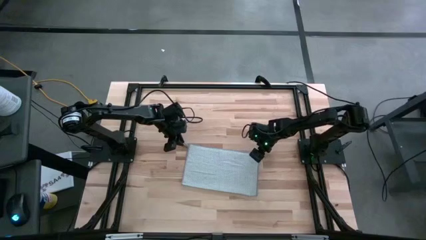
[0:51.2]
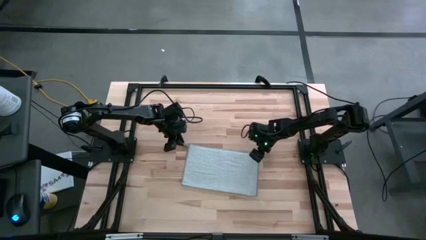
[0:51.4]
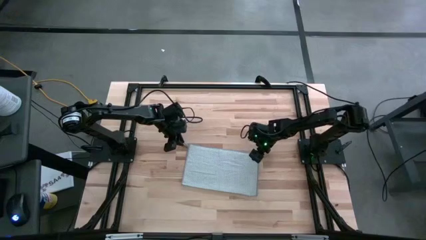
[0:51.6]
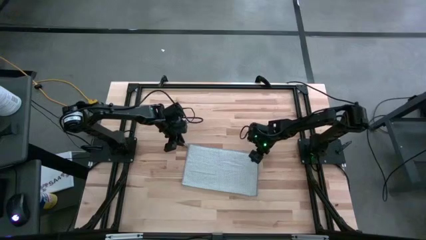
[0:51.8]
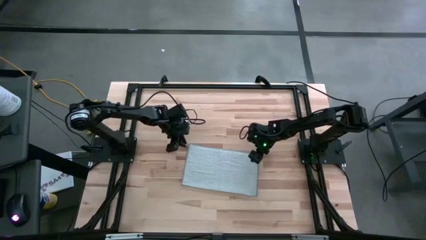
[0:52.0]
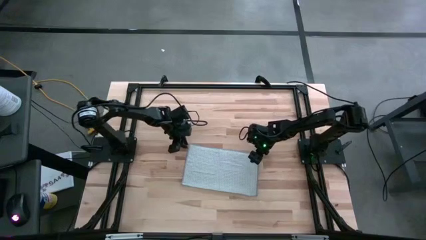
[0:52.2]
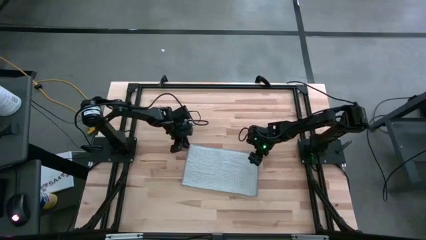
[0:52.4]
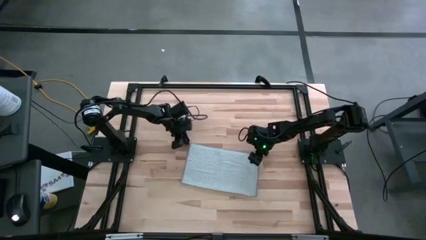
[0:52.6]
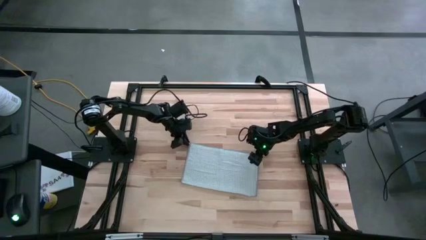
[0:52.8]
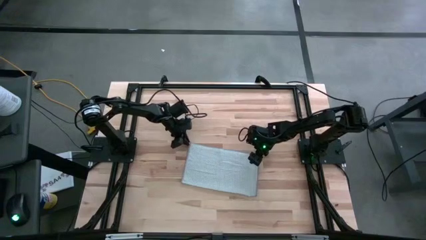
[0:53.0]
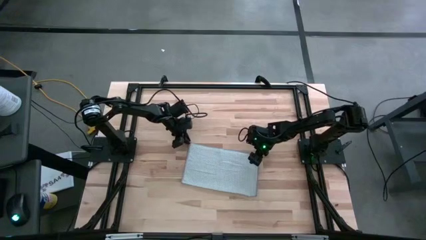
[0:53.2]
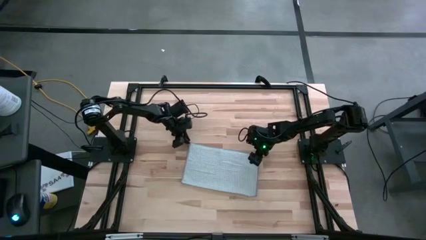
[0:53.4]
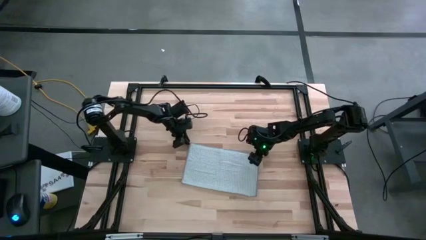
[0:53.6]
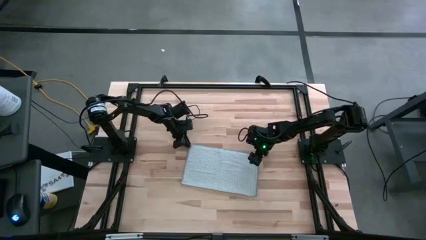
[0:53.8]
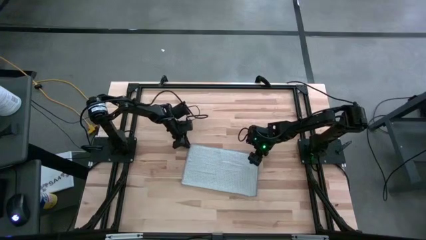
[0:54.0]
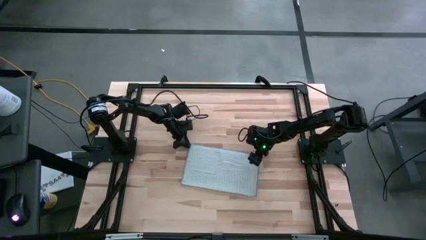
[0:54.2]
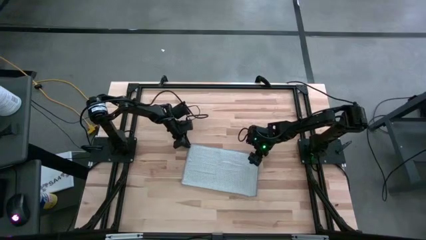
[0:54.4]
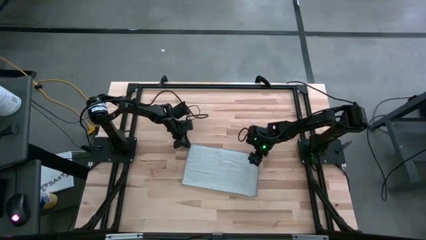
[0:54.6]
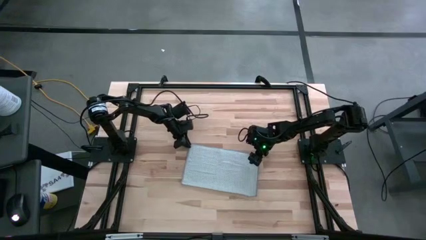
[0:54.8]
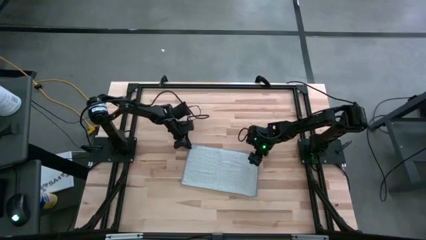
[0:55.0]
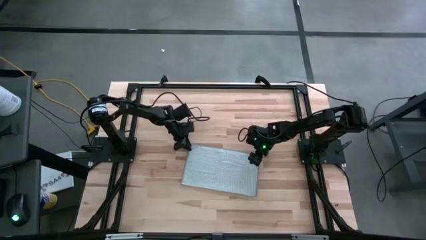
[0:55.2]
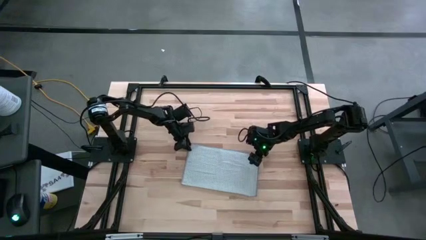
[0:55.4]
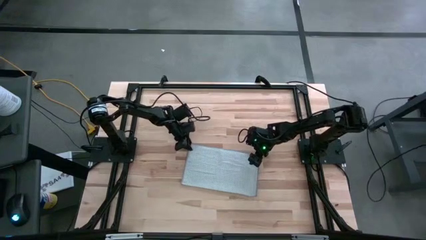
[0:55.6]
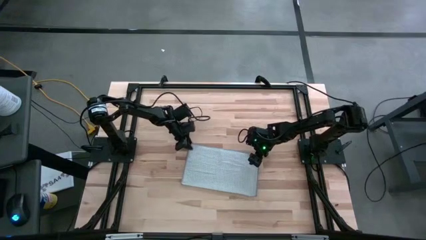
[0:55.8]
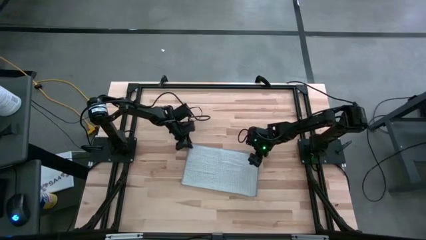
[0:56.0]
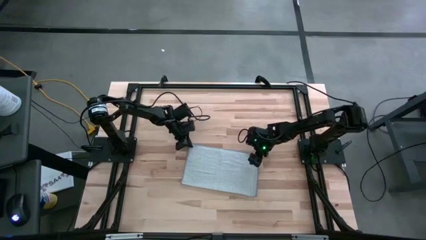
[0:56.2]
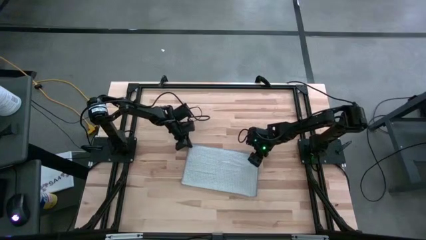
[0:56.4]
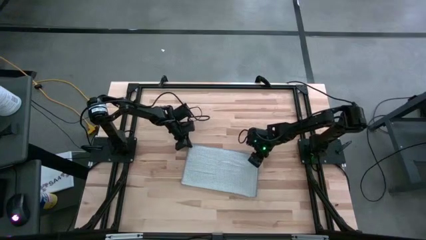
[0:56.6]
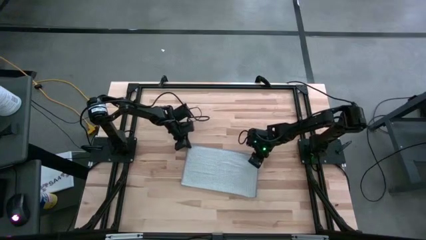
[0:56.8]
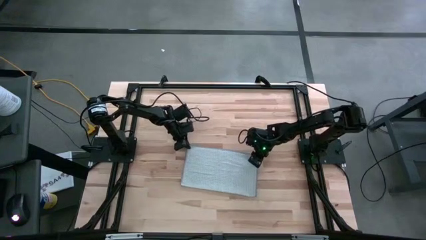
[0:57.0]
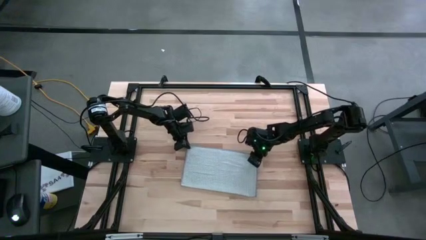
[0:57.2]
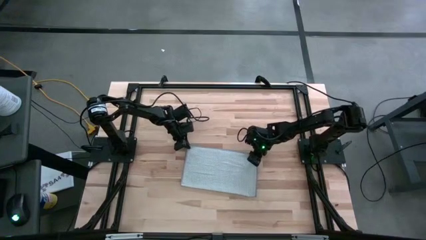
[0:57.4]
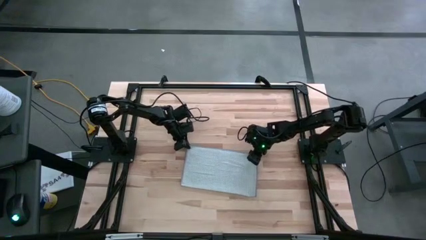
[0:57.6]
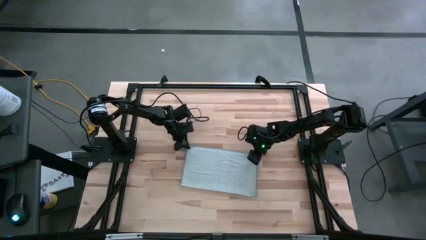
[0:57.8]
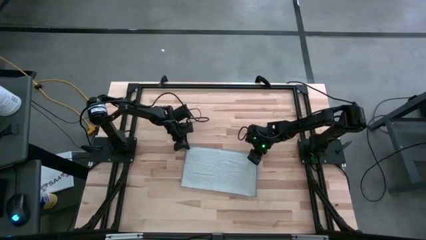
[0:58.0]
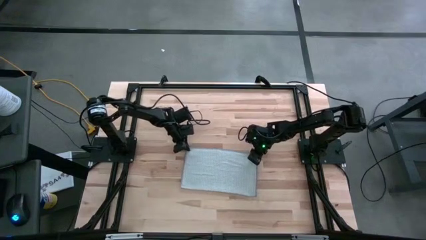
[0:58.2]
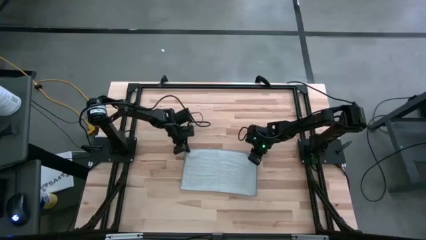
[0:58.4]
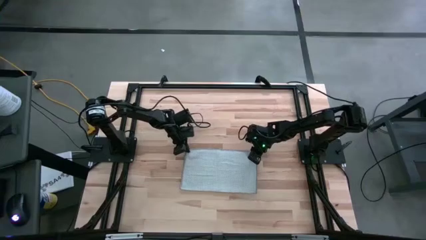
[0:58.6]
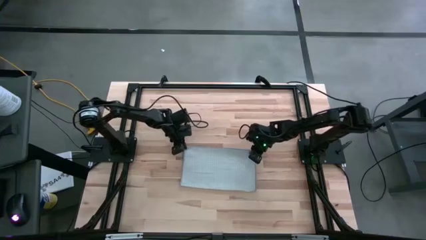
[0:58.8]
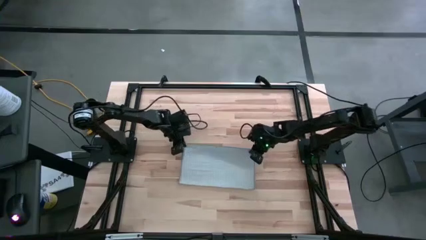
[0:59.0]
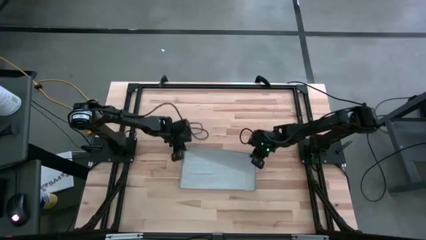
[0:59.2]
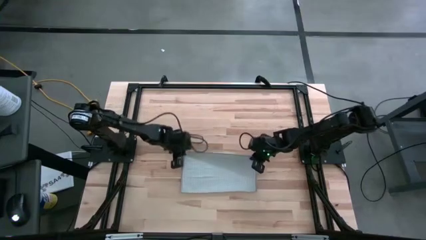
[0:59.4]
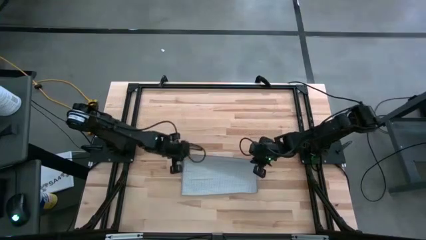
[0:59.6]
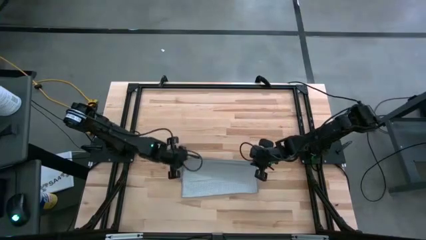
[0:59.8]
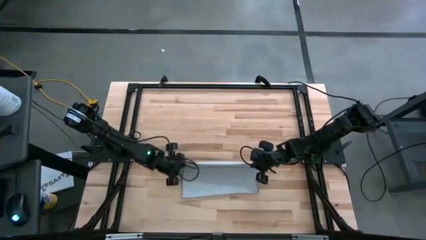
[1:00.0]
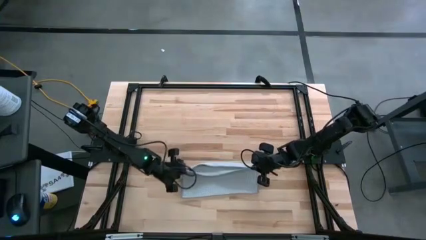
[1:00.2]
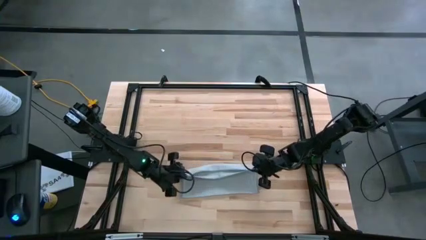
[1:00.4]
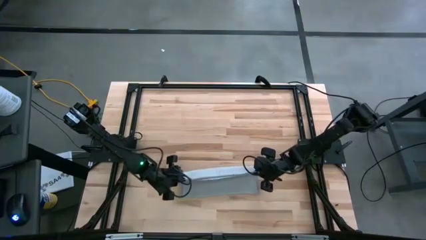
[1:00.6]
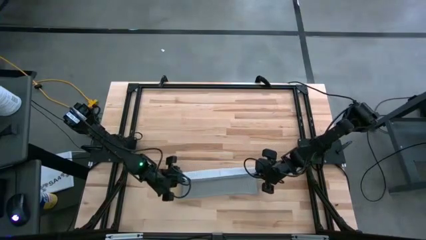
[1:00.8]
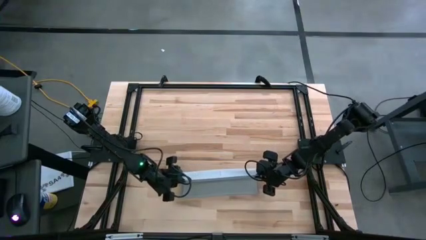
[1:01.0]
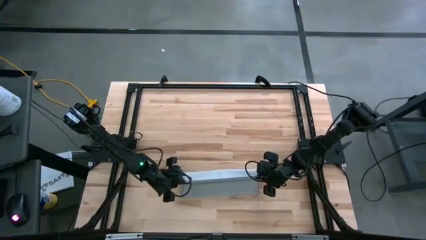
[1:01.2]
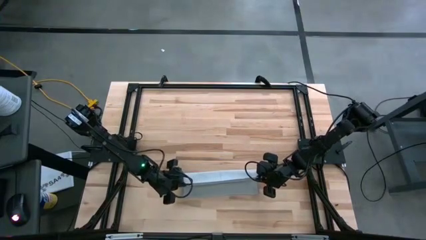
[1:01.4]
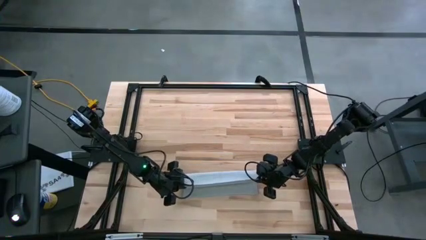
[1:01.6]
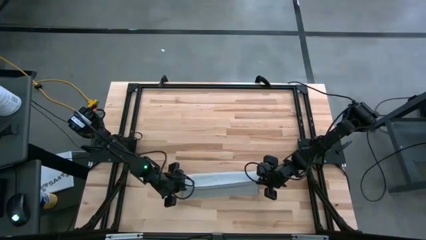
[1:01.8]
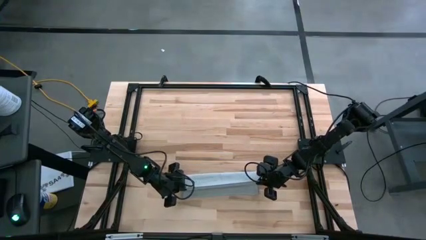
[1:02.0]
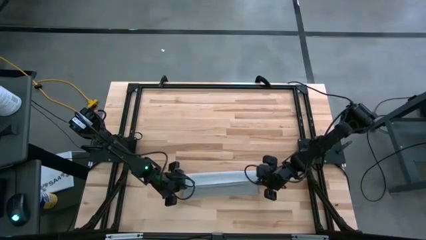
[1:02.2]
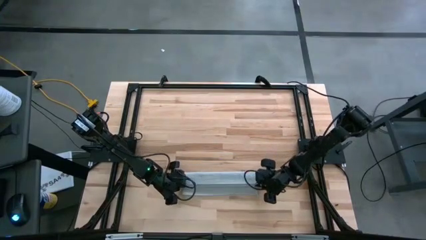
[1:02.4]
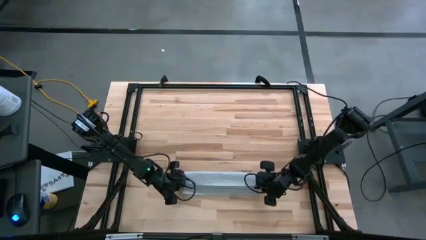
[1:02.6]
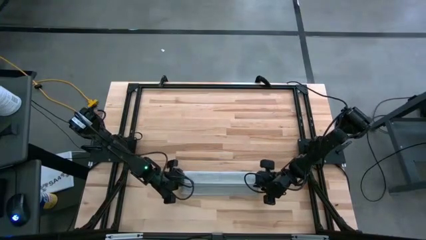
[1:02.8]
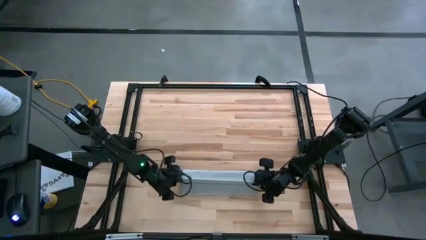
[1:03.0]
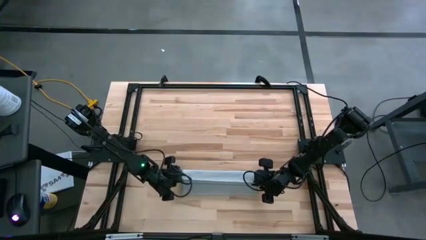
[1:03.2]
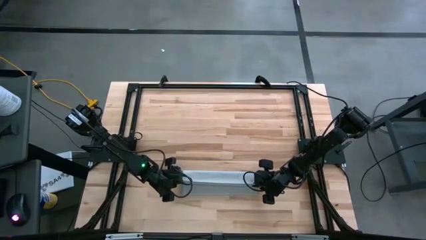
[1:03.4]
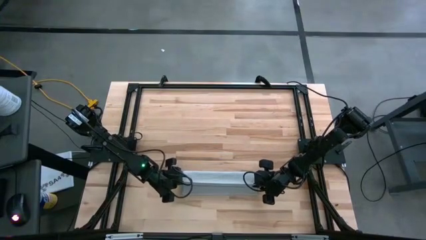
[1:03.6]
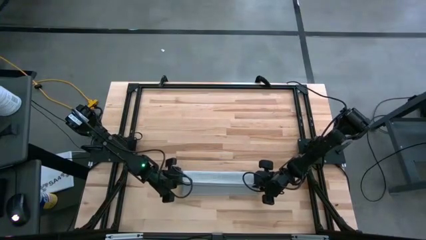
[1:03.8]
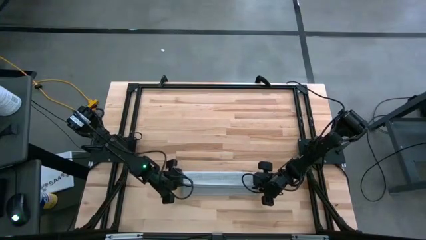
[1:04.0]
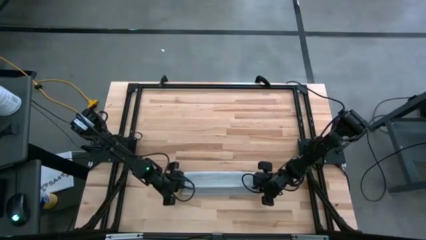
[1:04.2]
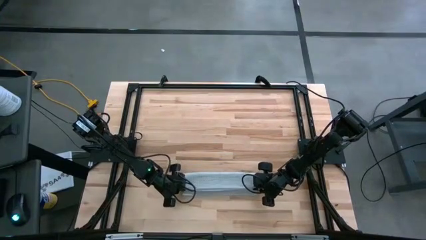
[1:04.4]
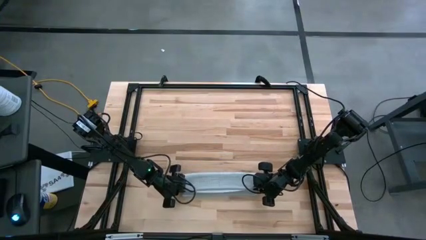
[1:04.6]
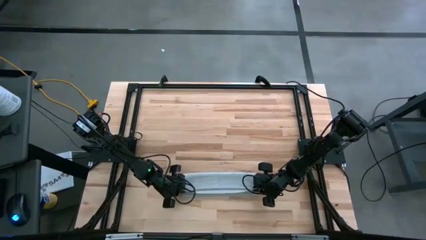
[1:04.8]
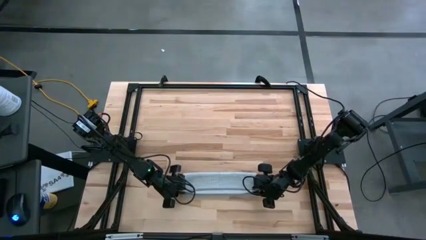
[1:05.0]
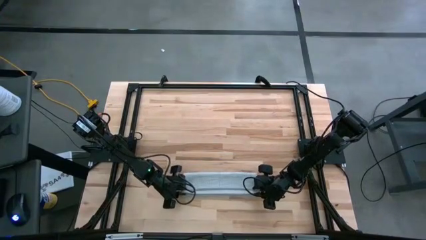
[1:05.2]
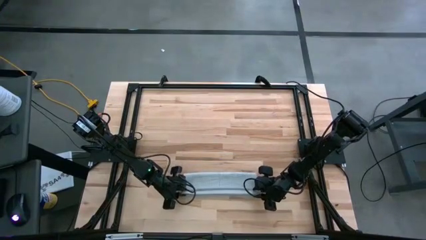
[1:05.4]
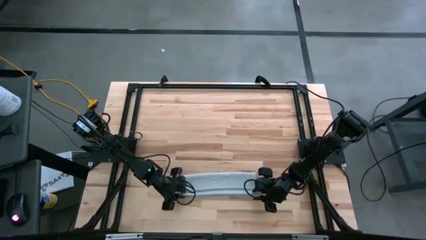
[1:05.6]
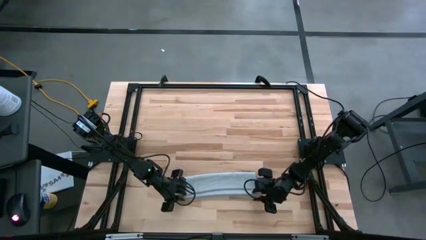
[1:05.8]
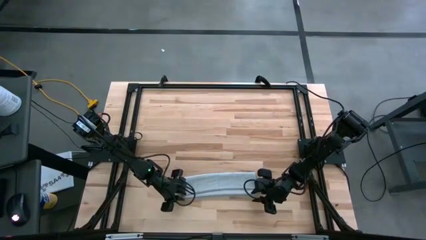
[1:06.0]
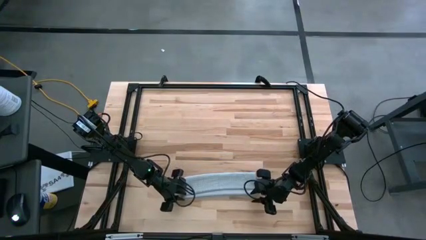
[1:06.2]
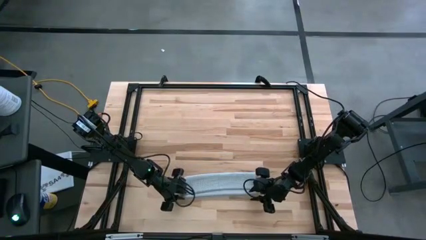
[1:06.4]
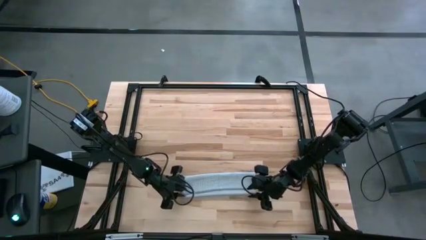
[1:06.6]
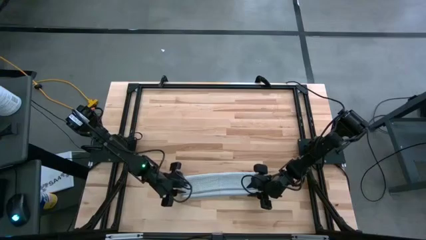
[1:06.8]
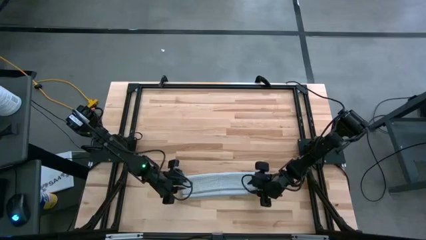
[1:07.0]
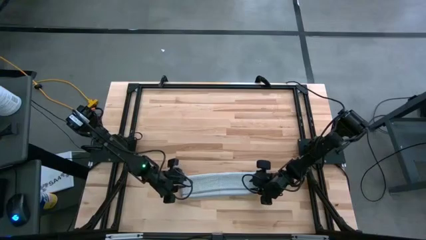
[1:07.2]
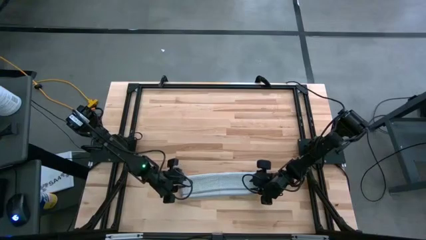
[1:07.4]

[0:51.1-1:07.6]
Task: Fold microfiber towels
Fold the gray towel
